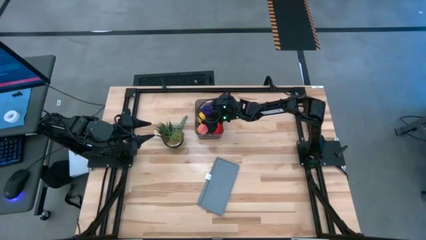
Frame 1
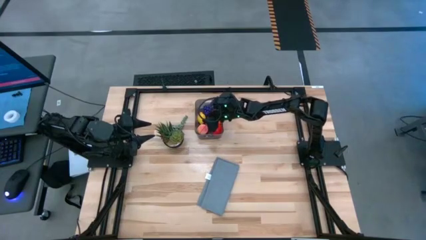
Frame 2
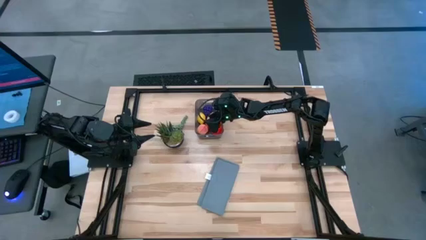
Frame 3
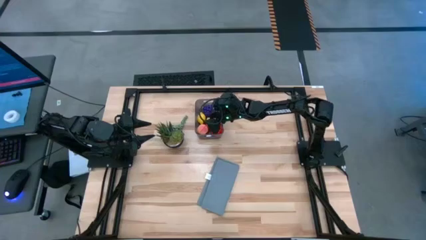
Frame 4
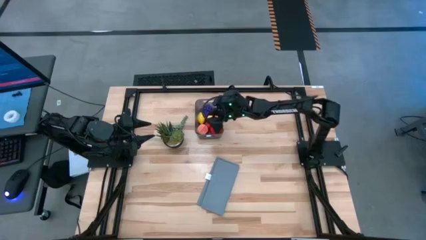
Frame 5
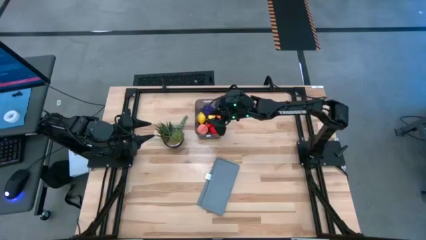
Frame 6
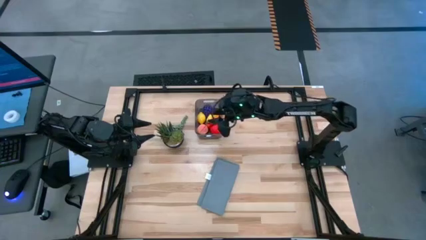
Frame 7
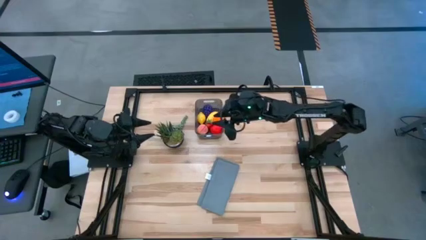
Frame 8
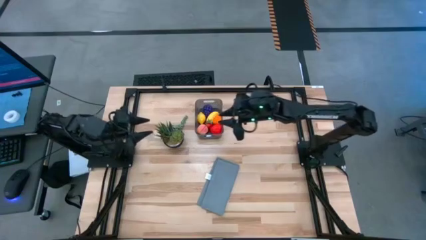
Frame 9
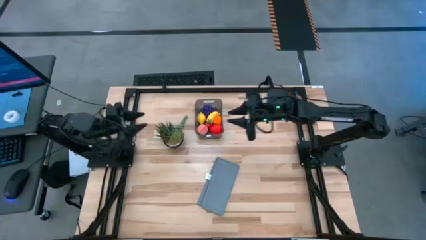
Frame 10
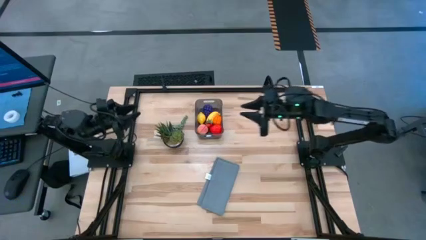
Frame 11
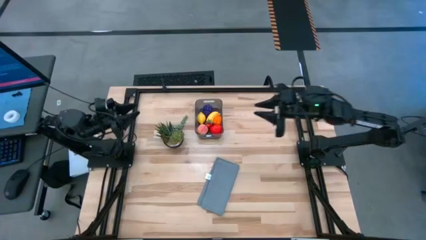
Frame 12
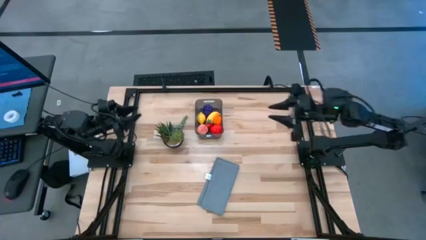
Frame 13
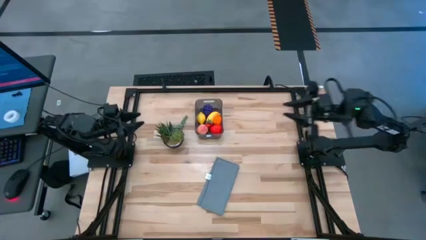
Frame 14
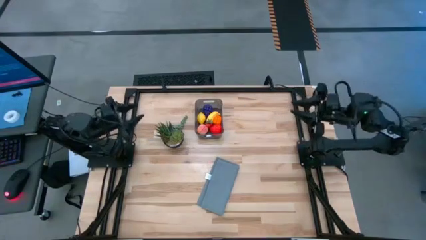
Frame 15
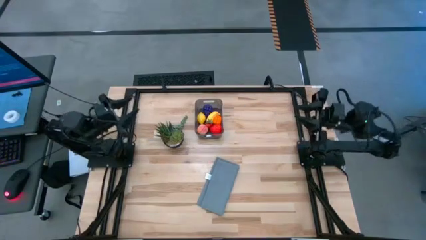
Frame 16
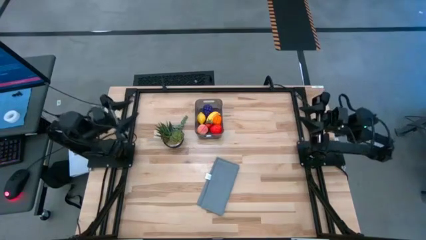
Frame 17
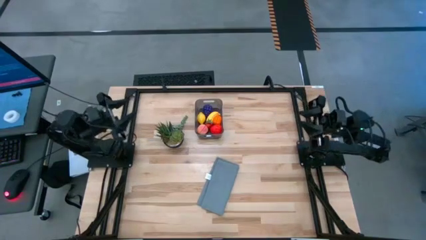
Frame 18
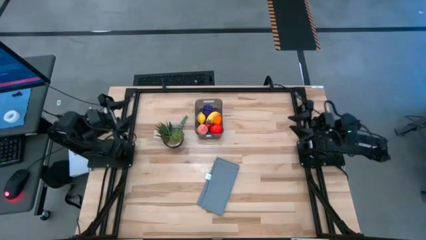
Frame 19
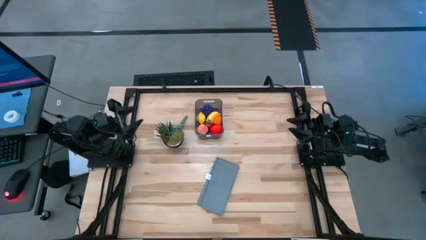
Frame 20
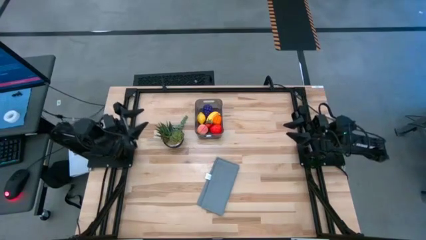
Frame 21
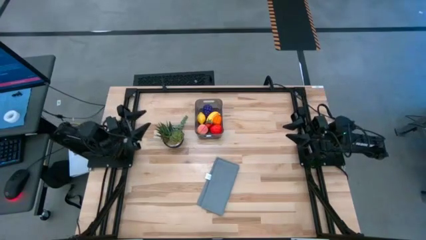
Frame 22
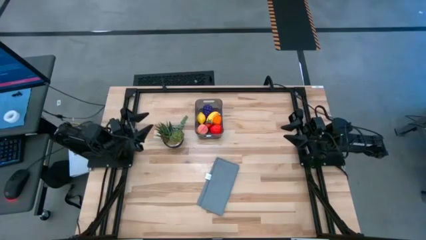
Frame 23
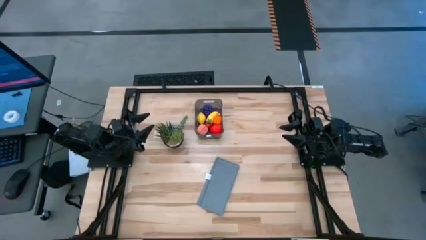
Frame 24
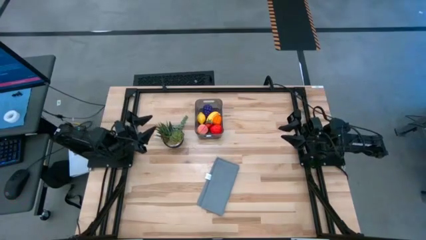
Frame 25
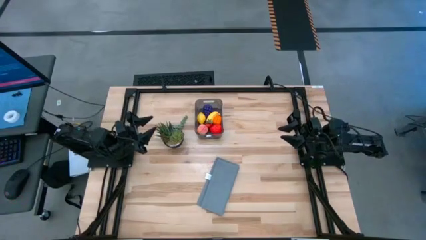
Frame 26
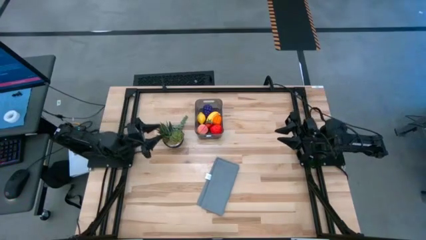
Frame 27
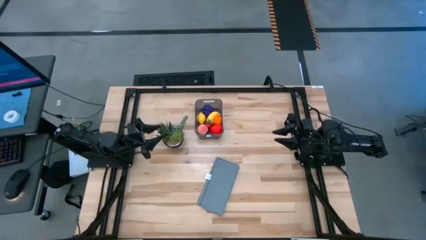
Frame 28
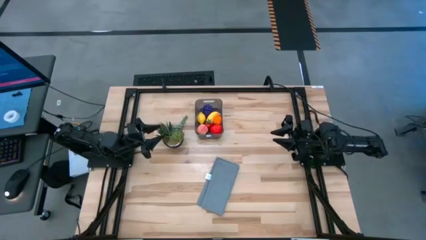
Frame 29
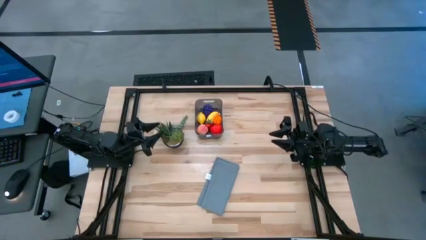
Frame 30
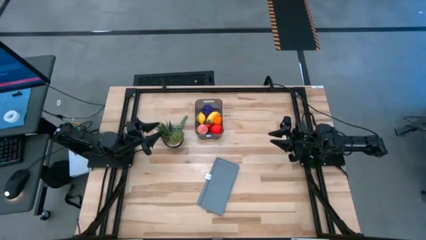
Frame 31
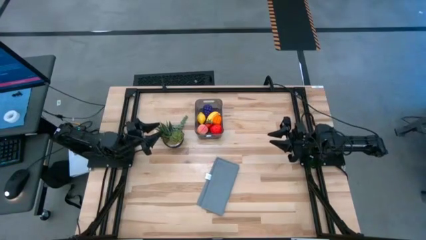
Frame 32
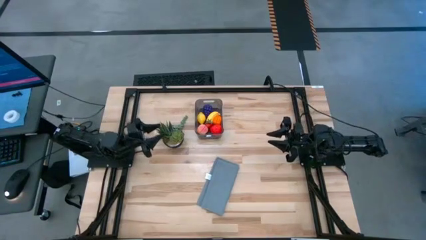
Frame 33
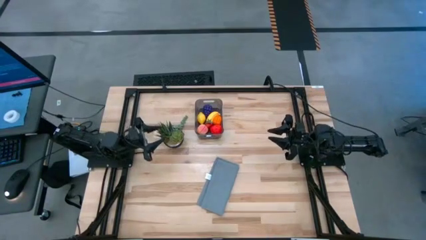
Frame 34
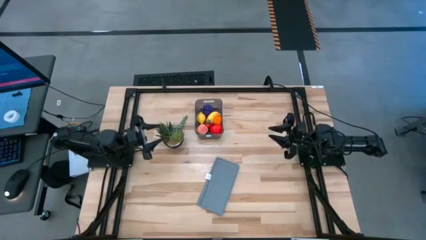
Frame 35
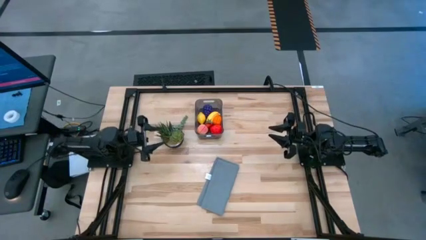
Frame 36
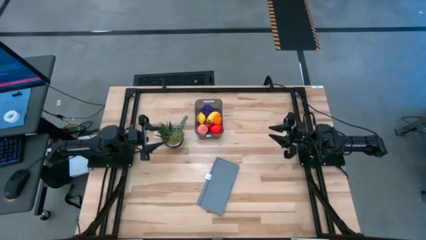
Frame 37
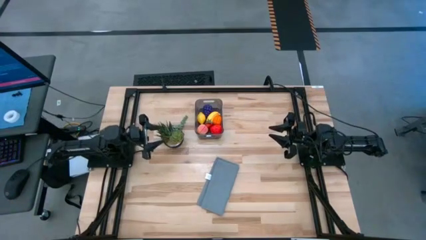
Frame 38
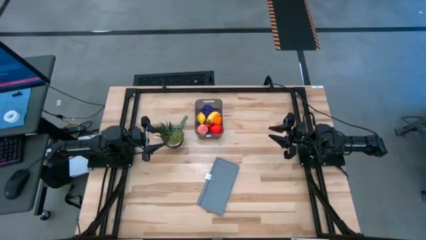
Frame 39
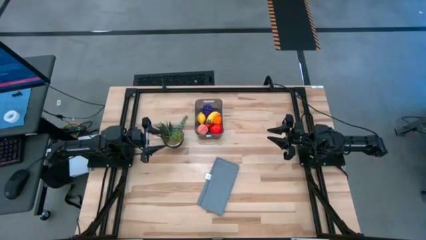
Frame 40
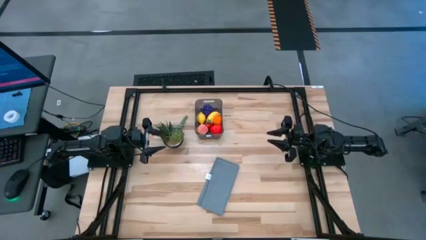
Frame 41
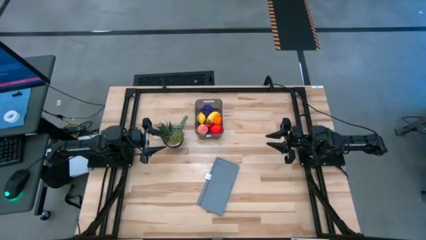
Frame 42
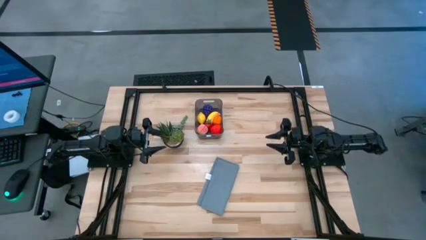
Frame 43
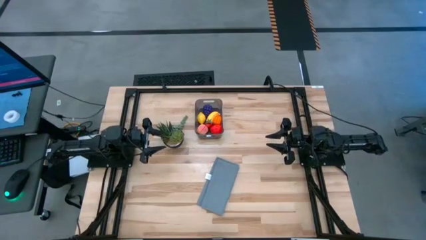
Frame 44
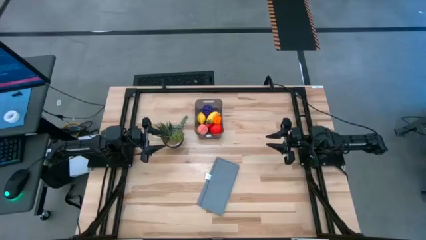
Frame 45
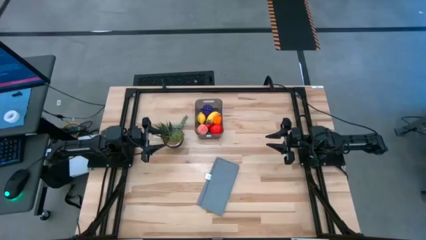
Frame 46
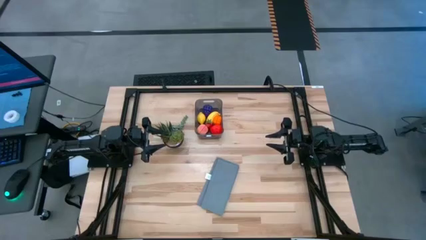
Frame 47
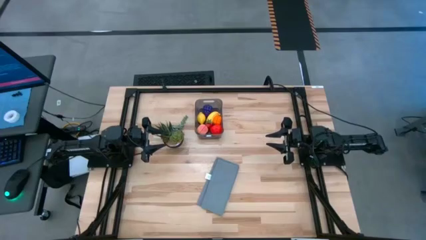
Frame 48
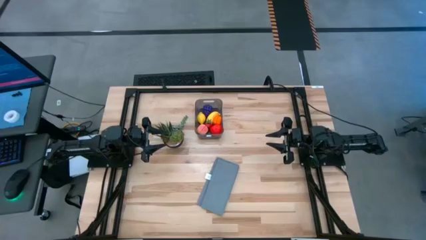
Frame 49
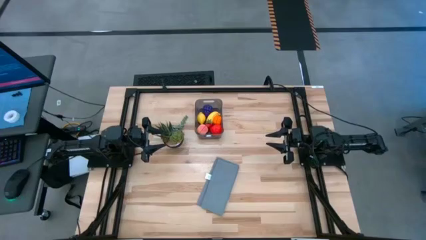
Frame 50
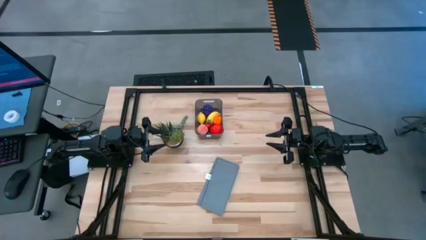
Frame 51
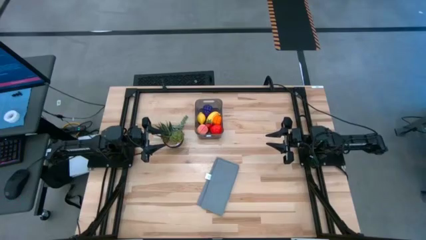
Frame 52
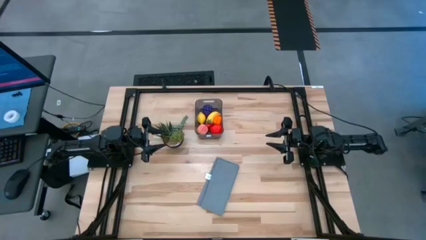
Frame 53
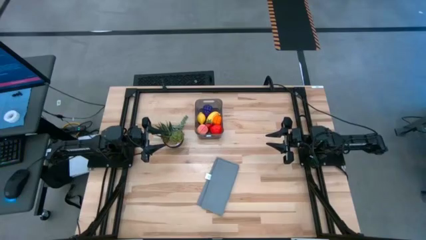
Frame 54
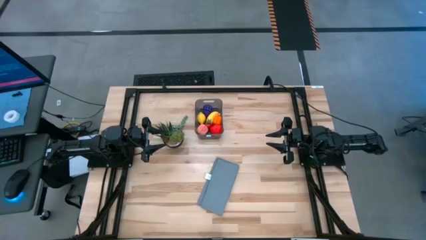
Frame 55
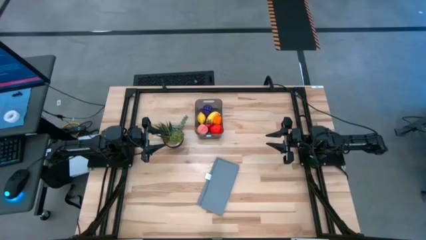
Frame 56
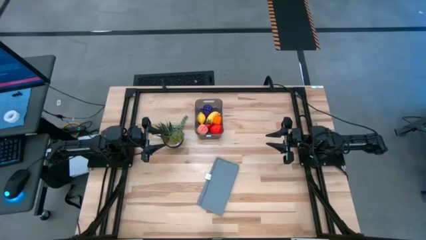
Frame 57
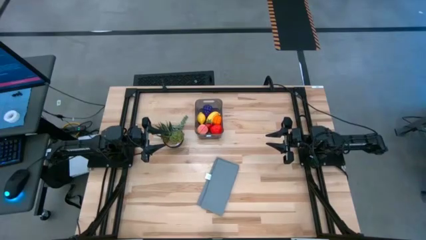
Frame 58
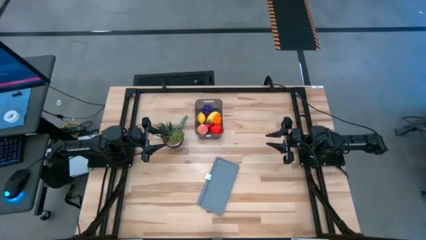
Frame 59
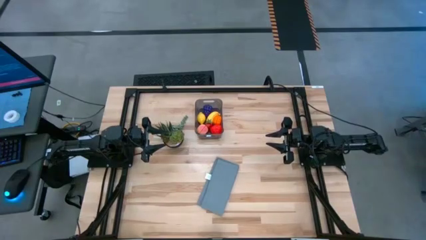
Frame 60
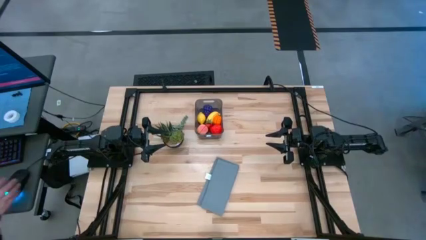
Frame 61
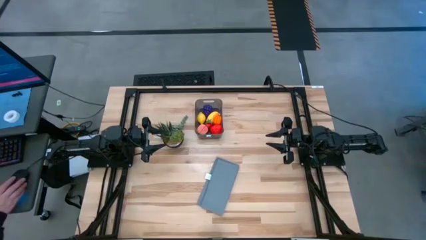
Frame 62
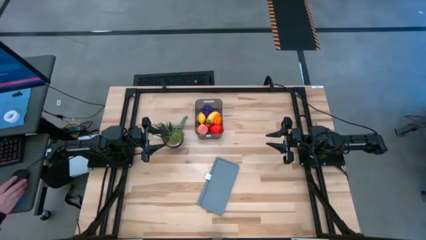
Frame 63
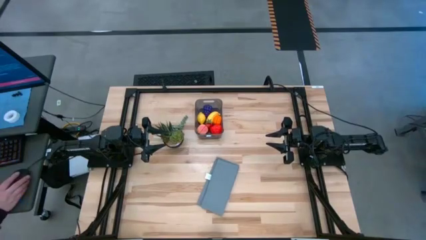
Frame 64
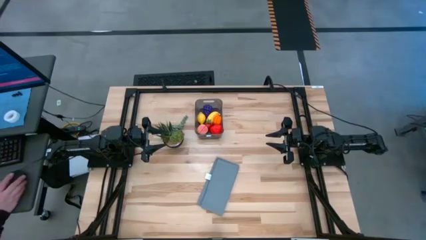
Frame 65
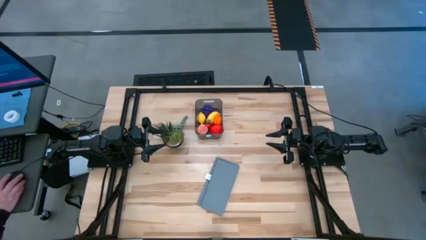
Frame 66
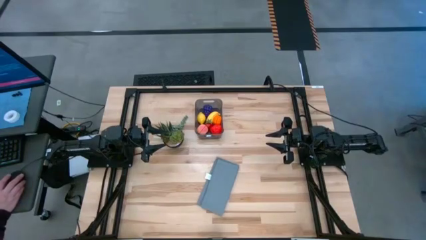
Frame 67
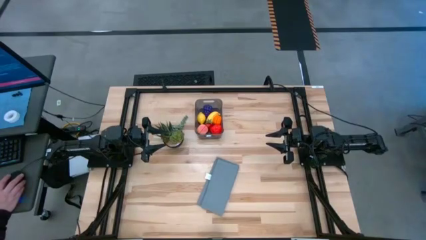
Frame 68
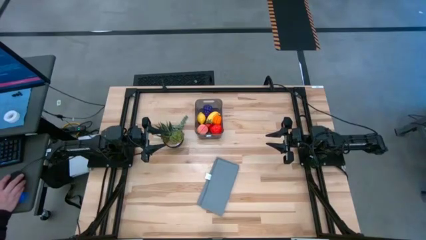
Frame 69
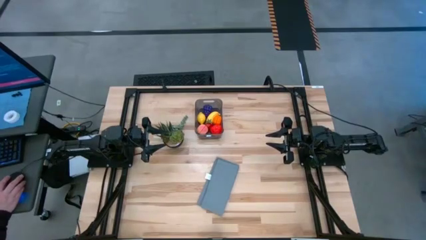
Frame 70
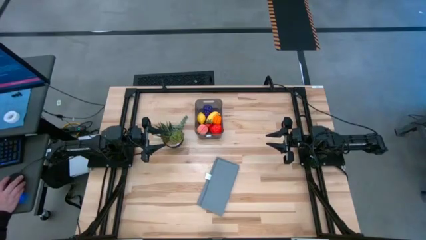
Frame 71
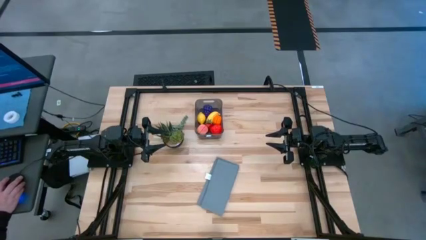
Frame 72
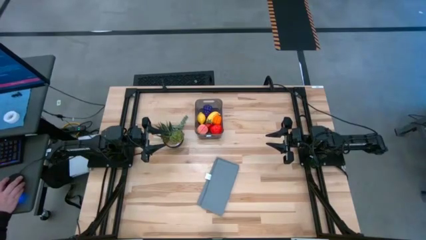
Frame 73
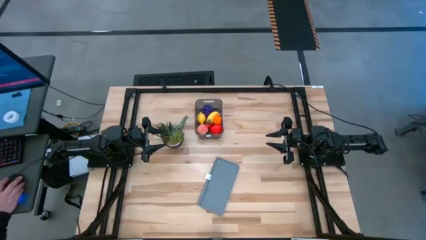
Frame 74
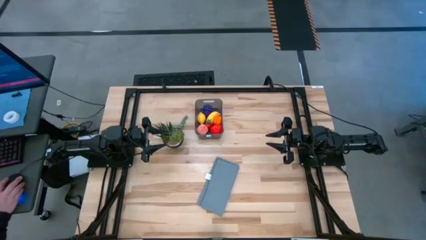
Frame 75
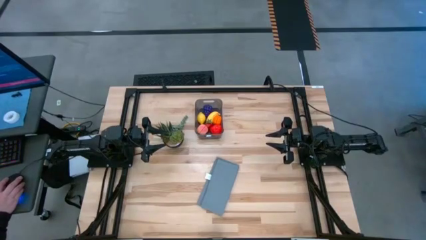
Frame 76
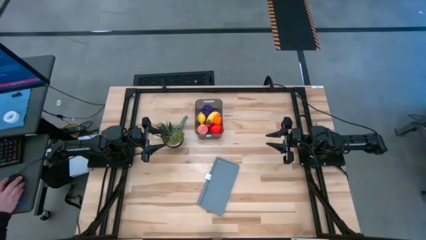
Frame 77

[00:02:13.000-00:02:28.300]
Task: Pick and placing Produce into tupperware
Return to Home Position
